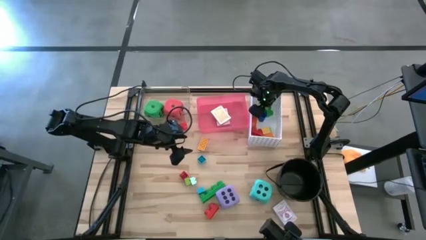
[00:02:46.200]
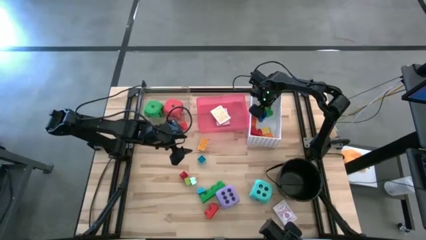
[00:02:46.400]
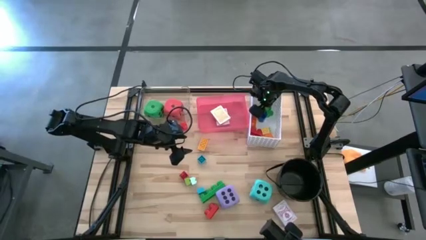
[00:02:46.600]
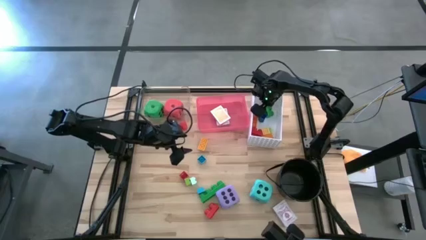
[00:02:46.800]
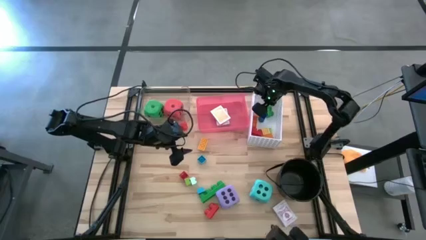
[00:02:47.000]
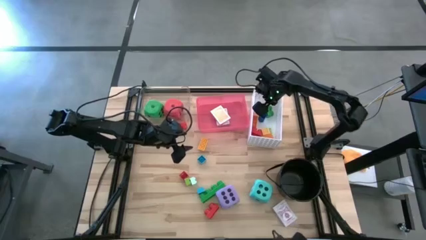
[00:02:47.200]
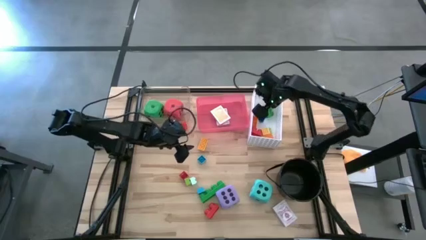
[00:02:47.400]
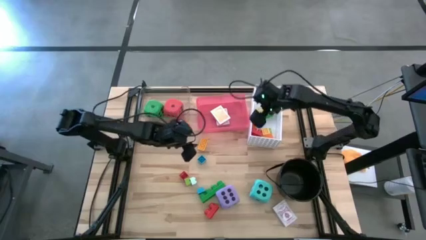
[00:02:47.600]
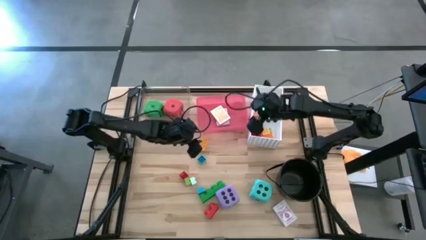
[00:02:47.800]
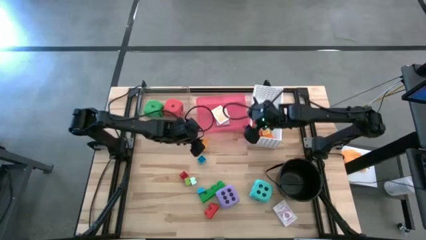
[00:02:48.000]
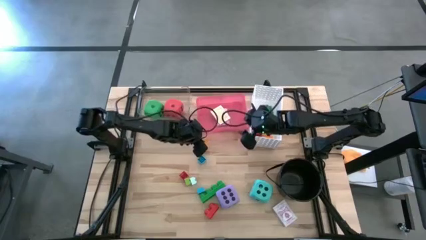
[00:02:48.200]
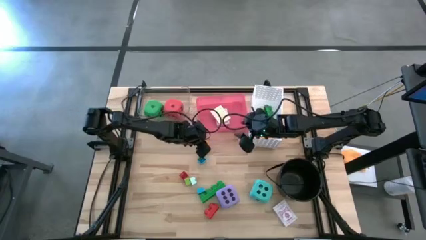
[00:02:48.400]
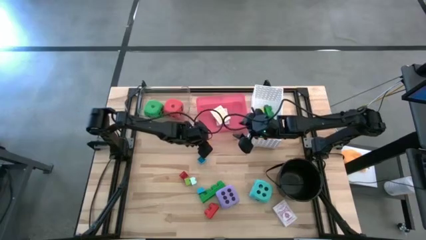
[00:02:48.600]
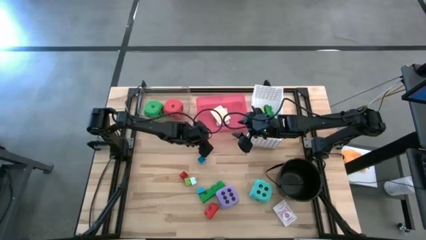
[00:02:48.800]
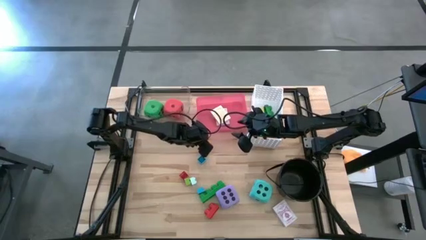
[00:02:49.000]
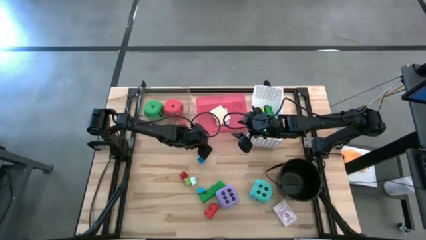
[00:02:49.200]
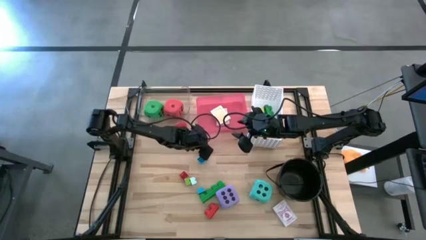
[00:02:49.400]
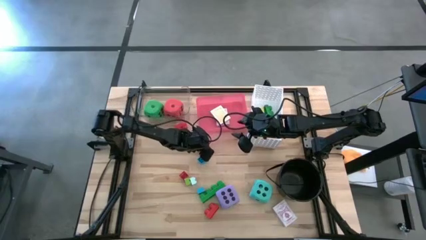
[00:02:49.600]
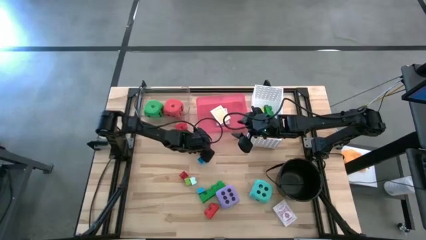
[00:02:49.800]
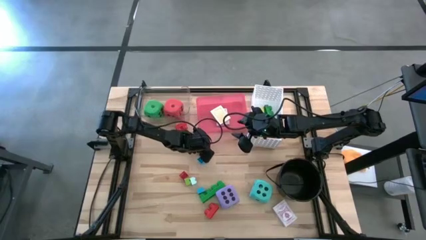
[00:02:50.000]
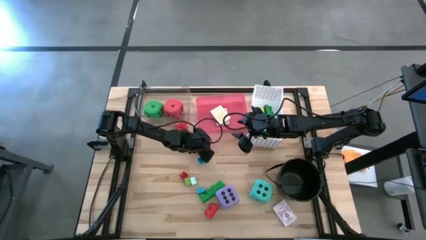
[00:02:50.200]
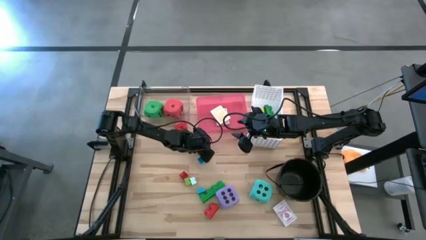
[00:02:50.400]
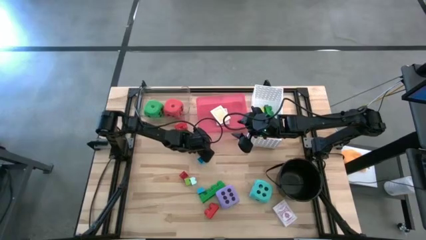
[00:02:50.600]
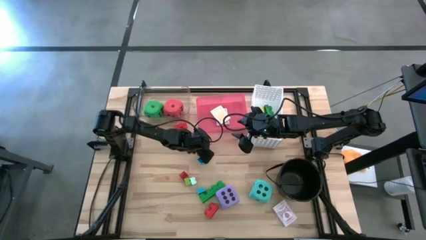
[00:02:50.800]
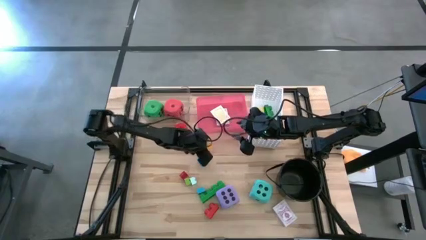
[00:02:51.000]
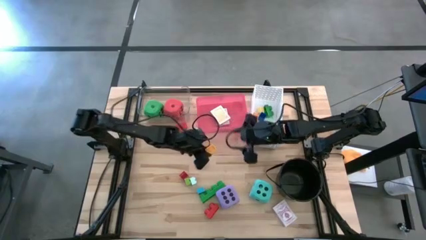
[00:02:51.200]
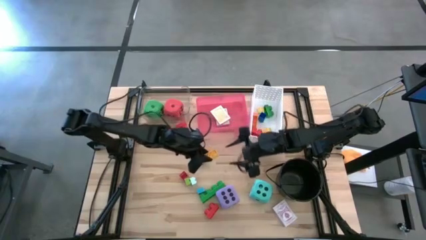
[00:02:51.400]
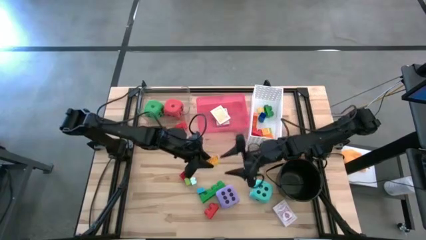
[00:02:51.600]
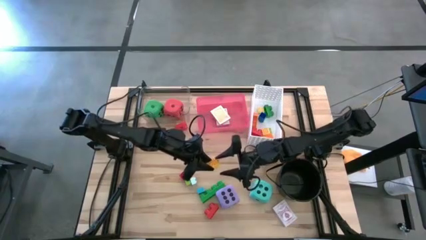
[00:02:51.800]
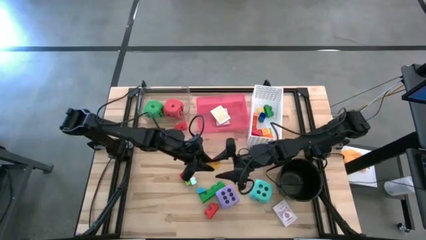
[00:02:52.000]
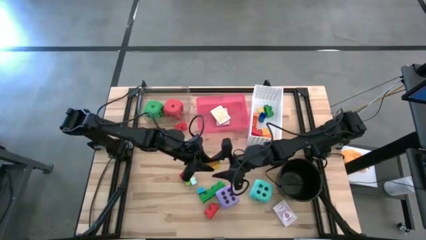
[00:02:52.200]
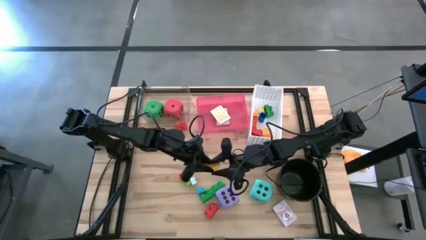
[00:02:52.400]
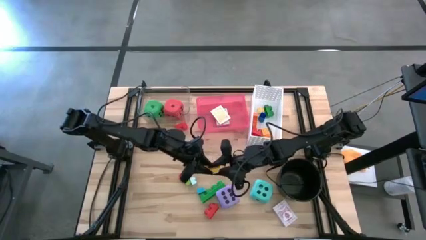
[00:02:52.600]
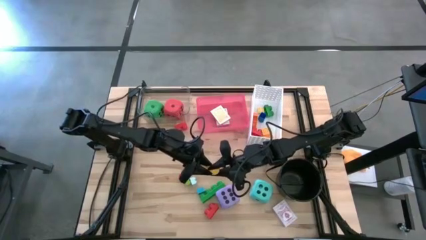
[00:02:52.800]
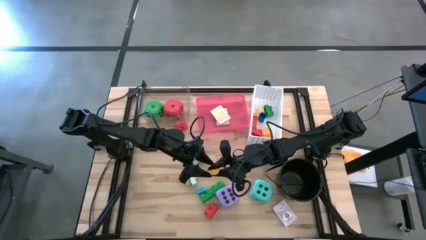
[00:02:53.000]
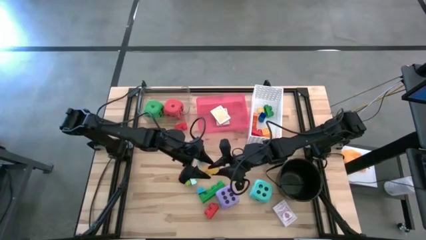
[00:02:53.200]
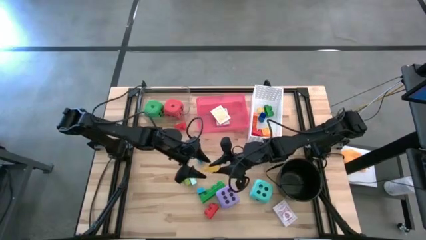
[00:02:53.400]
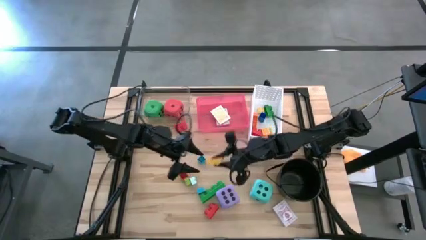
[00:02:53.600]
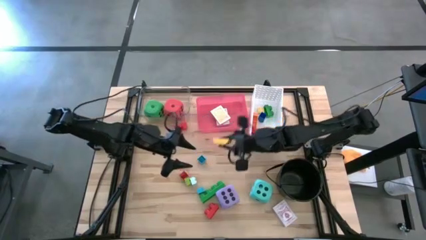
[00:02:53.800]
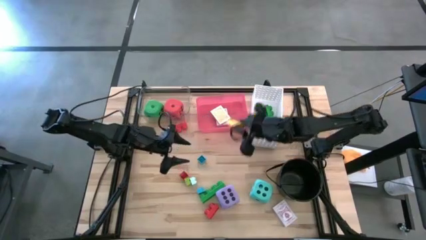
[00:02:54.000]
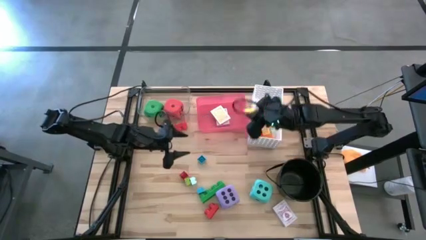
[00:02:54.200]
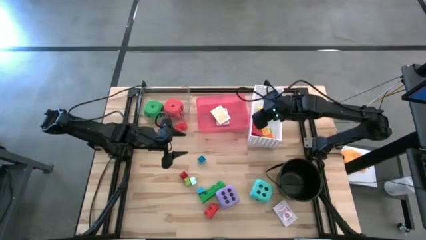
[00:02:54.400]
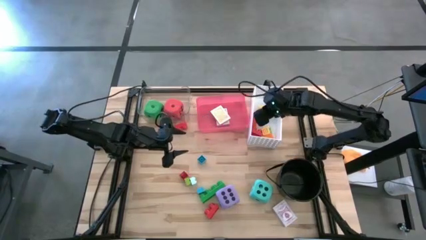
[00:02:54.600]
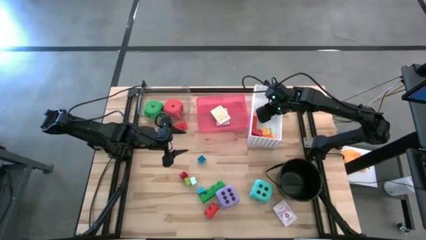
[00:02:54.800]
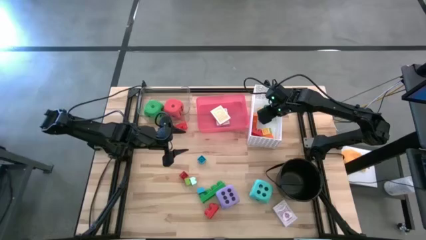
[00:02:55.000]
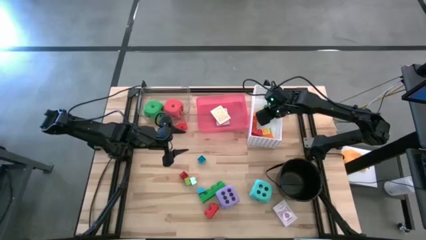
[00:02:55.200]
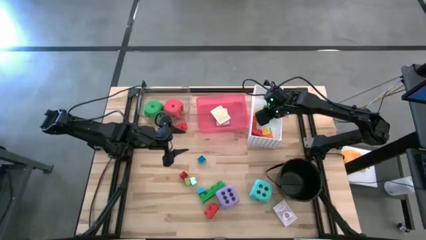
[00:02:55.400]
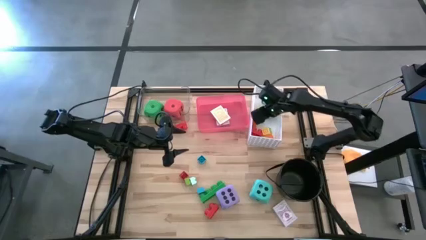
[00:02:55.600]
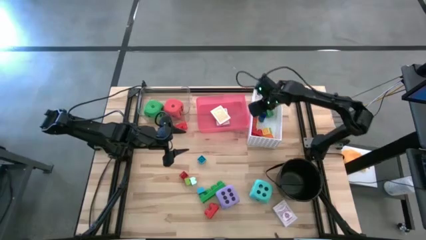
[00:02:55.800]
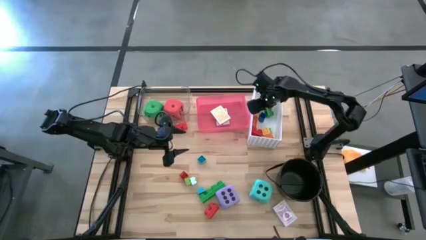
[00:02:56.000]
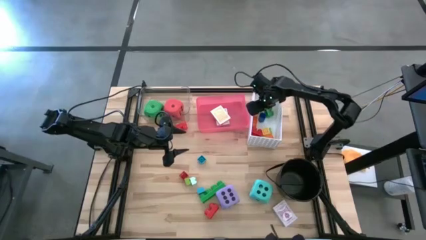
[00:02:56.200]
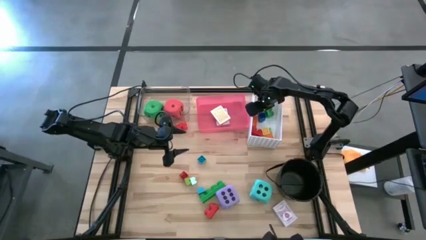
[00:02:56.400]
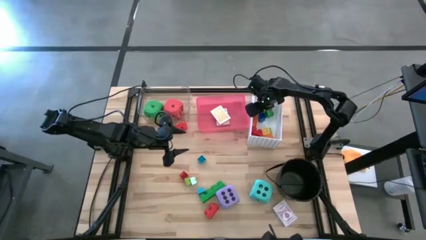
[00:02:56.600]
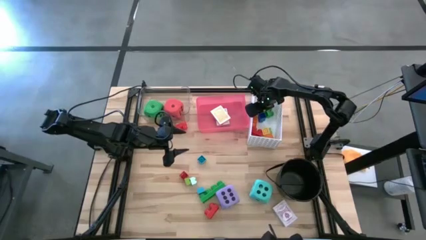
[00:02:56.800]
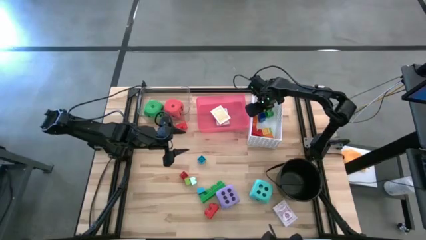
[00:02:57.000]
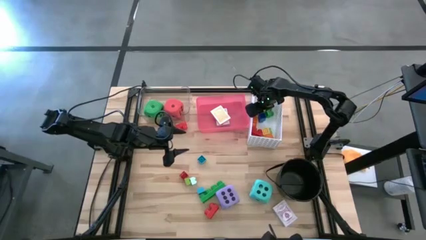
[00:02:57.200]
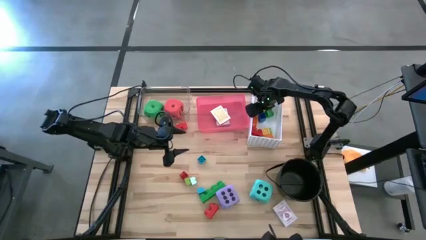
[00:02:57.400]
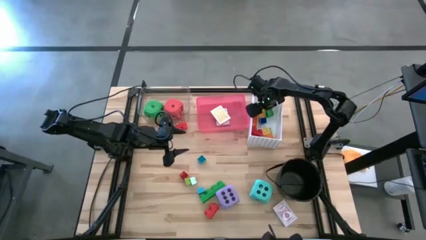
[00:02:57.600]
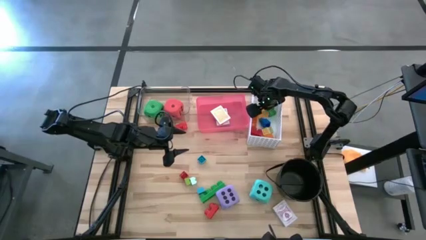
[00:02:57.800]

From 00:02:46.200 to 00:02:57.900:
Task: Pick & Place Toys
Put the small yellow game piece into the white bin

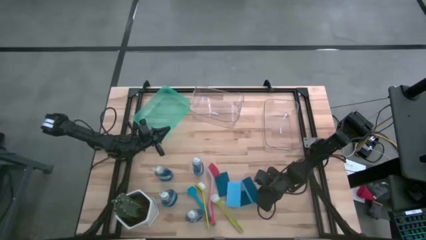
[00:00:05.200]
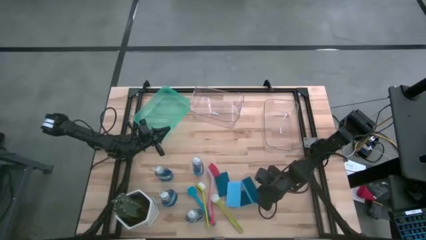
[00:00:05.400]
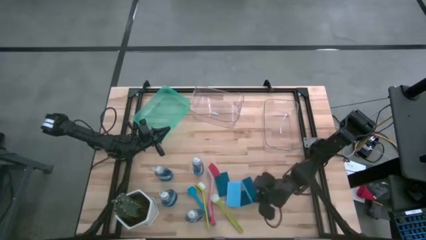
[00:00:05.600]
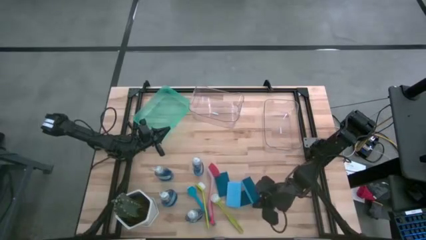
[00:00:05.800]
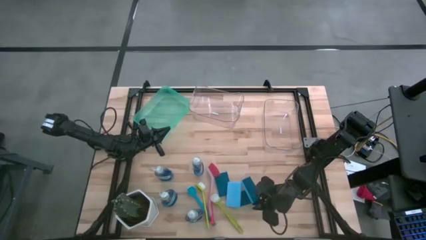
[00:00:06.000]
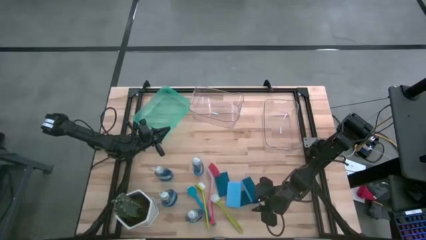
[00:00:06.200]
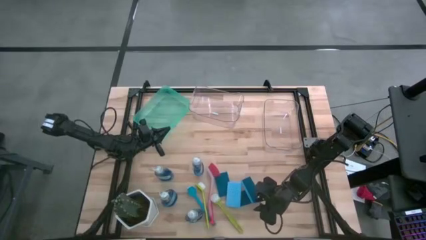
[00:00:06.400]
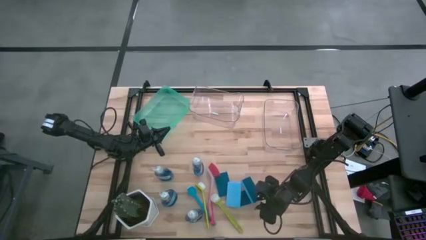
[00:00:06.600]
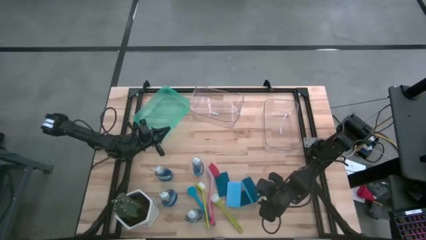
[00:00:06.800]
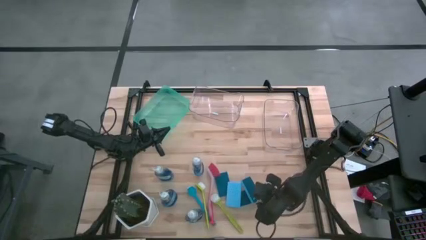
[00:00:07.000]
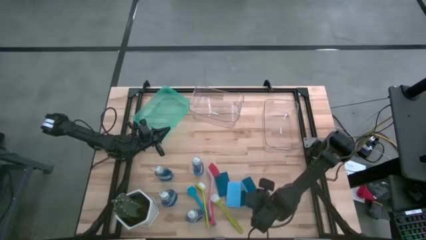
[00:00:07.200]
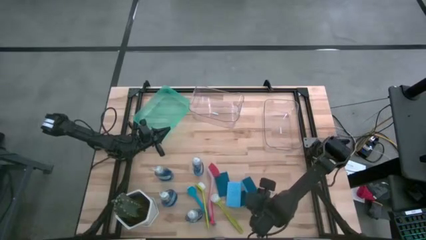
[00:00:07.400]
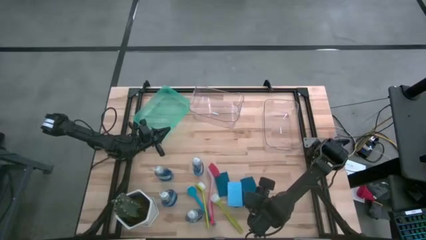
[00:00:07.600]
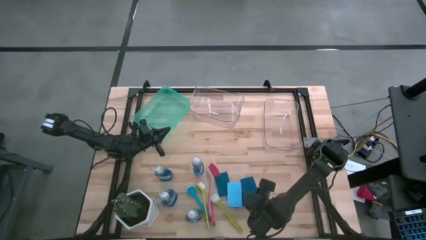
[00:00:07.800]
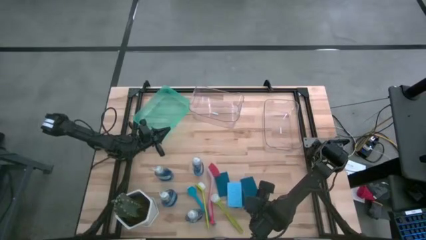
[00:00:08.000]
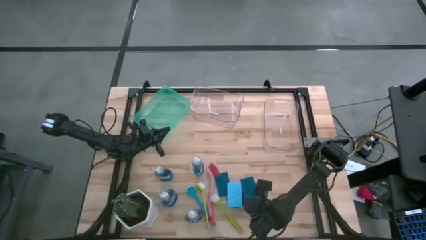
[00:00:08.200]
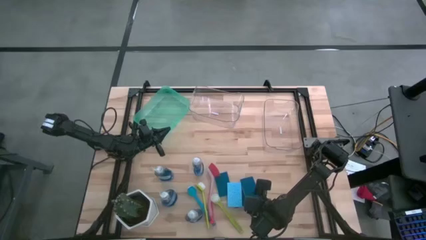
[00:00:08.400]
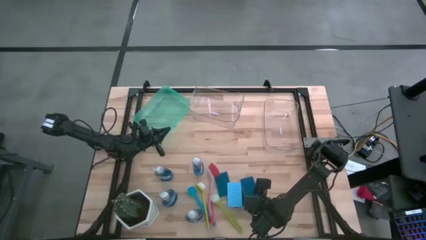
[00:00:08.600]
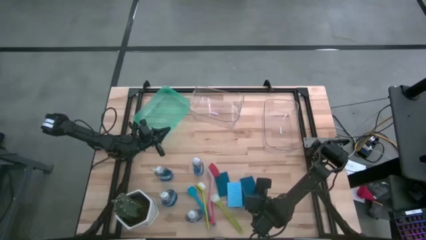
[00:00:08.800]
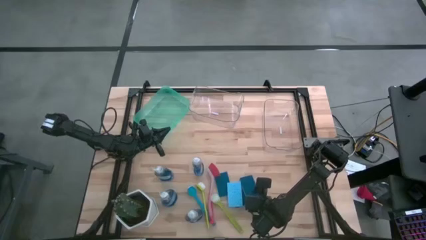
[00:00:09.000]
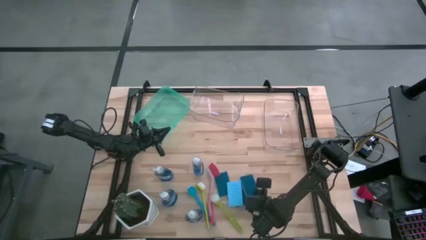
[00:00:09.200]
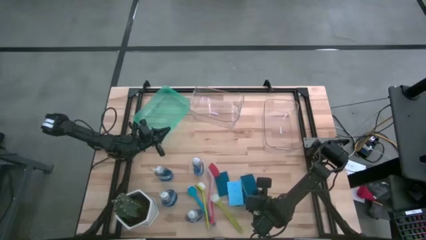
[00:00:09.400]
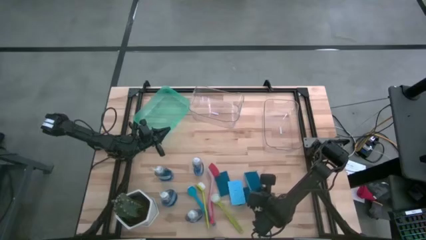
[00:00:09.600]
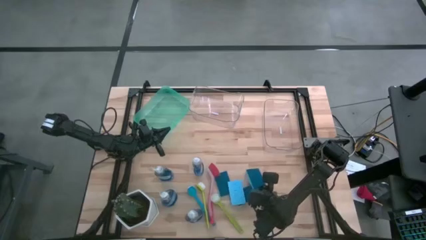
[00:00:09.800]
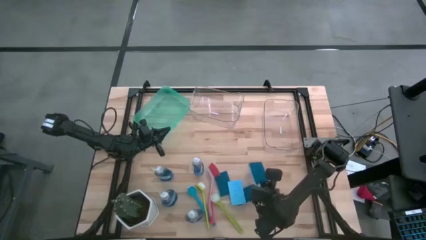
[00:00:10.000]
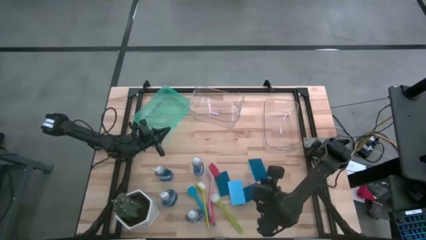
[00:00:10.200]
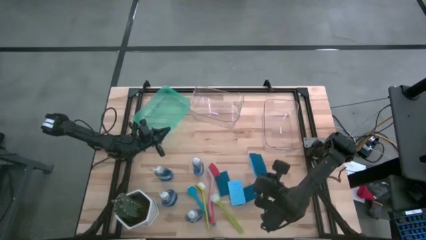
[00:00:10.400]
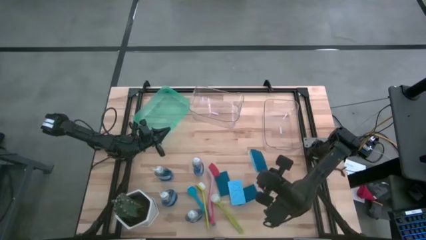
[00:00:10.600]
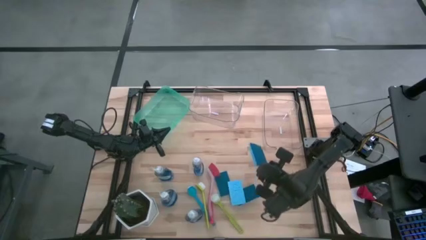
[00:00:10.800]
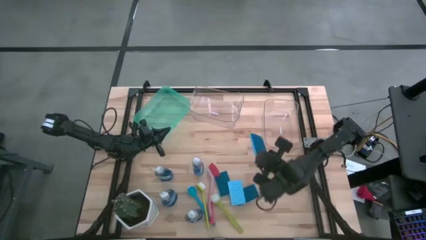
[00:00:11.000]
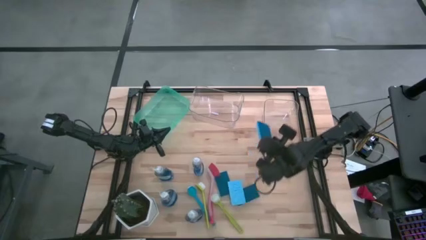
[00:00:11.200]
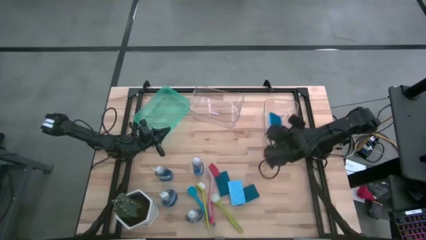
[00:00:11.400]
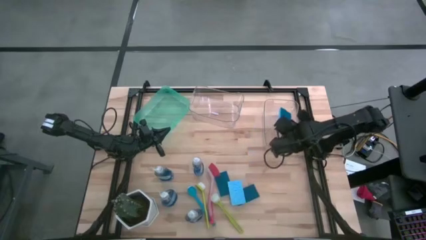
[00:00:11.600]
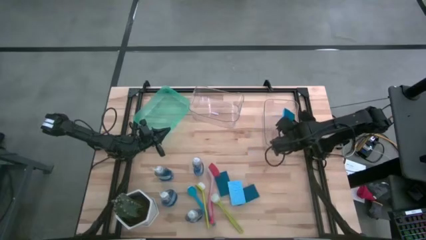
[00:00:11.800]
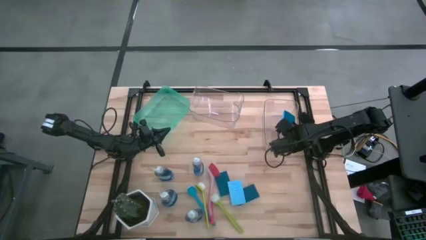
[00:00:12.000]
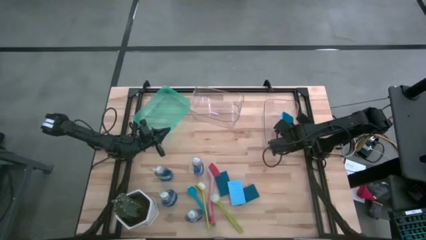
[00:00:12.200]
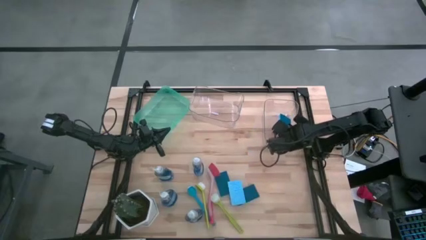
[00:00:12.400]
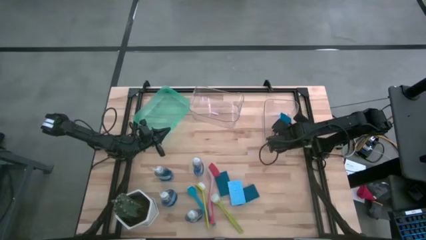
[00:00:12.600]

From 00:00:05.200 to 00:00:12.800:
Task: Pick & Place Kitchen Sink Supplies
Put the blue sponge in the right transparent bin
